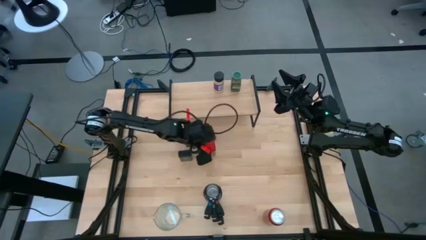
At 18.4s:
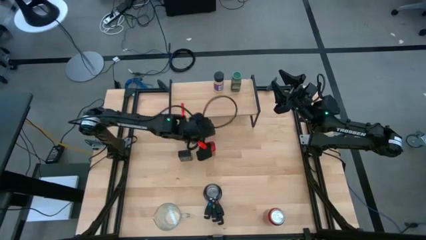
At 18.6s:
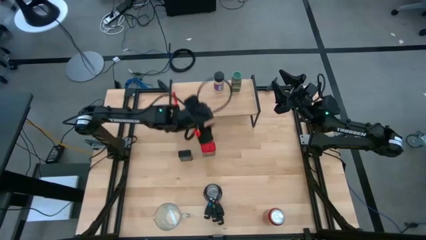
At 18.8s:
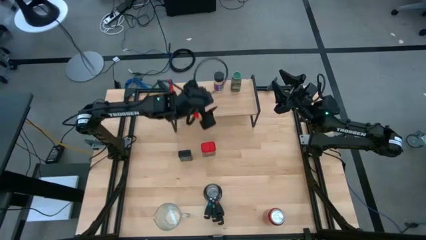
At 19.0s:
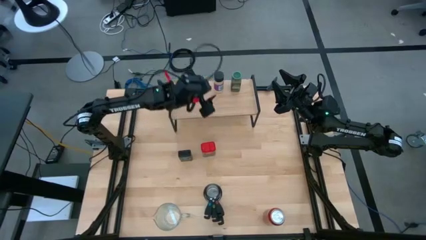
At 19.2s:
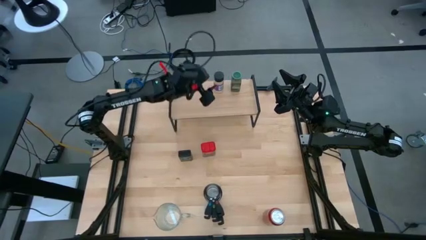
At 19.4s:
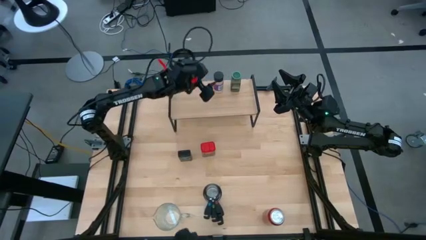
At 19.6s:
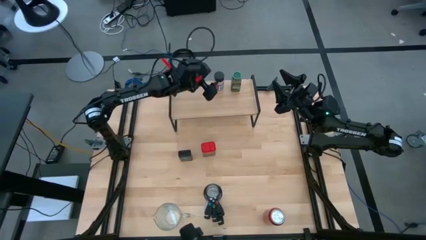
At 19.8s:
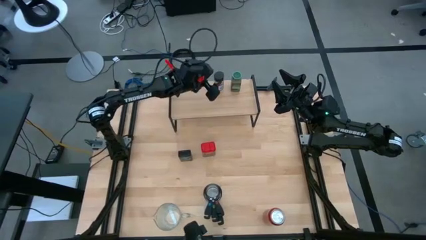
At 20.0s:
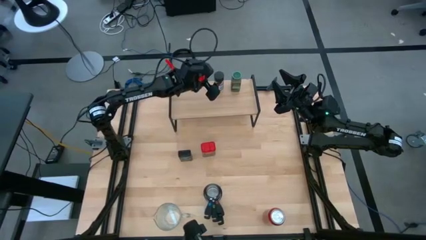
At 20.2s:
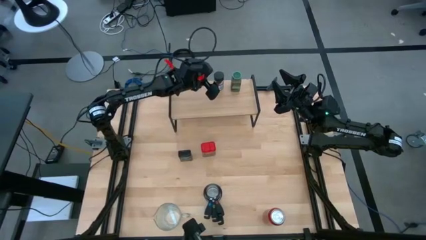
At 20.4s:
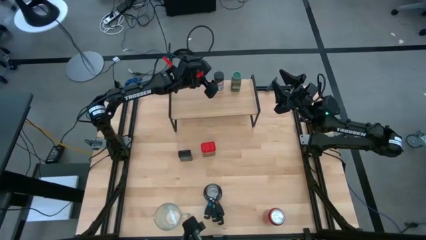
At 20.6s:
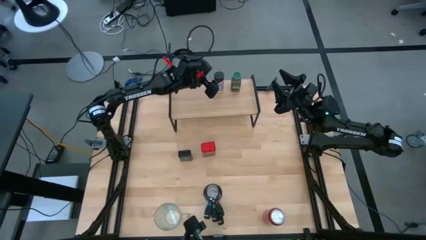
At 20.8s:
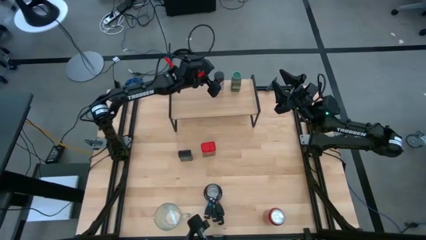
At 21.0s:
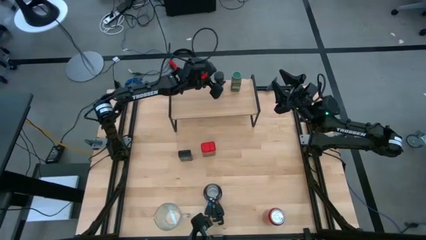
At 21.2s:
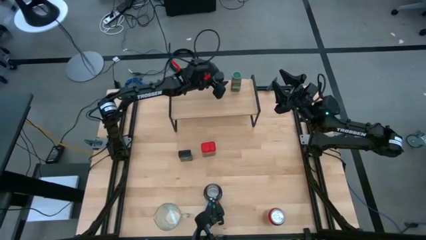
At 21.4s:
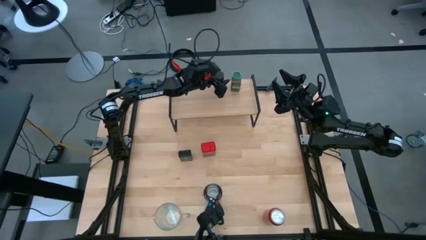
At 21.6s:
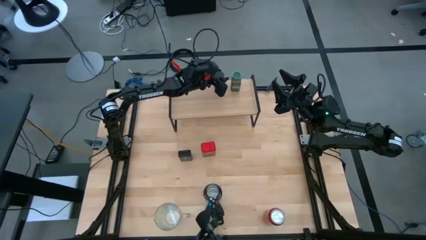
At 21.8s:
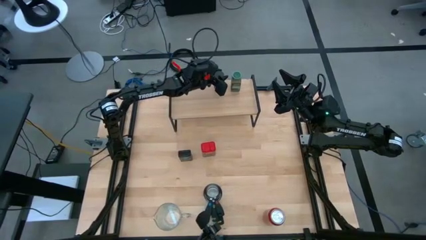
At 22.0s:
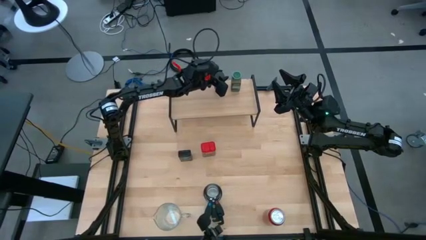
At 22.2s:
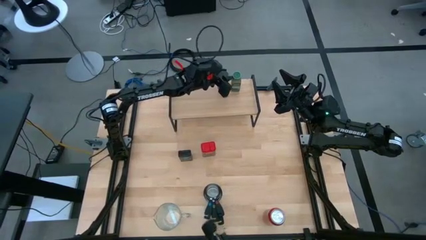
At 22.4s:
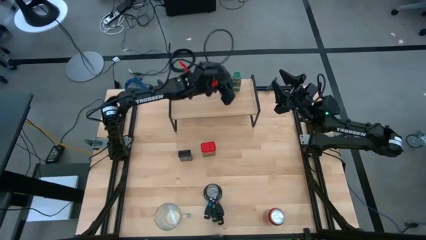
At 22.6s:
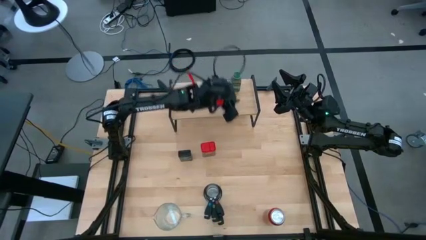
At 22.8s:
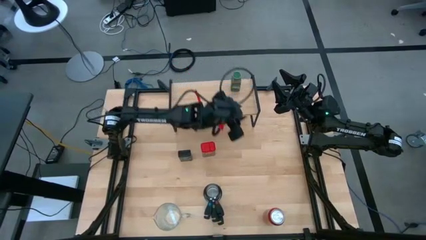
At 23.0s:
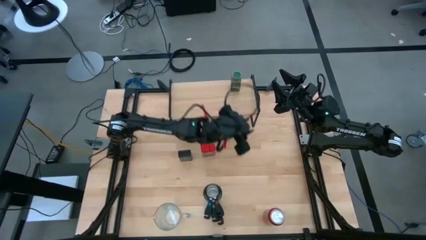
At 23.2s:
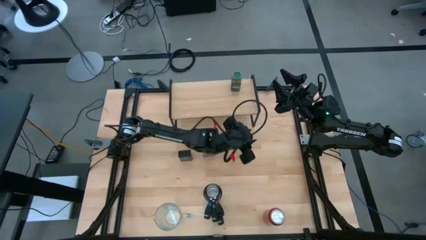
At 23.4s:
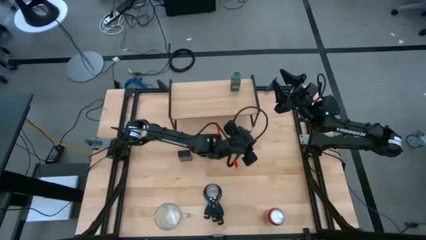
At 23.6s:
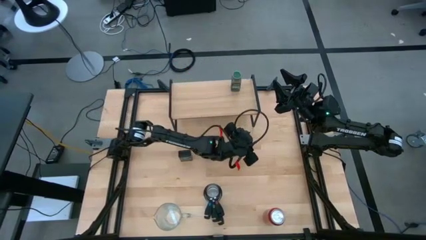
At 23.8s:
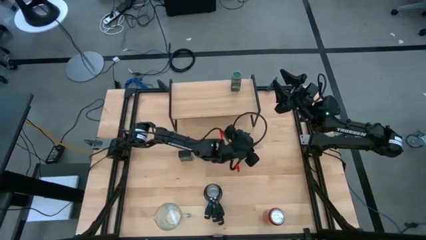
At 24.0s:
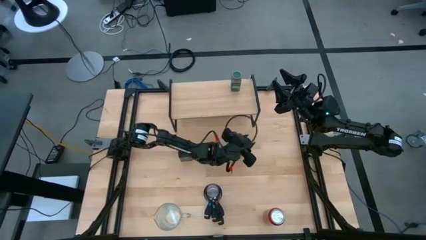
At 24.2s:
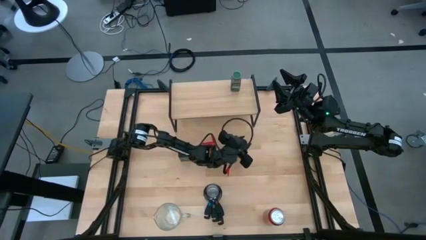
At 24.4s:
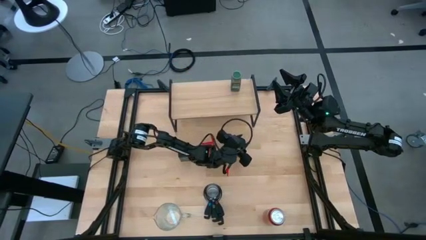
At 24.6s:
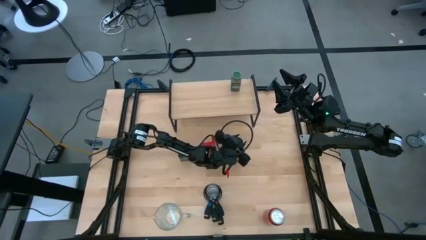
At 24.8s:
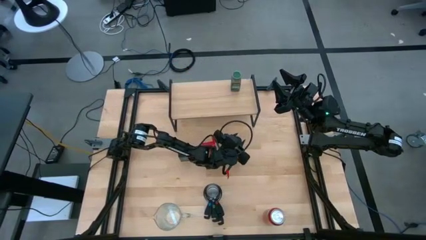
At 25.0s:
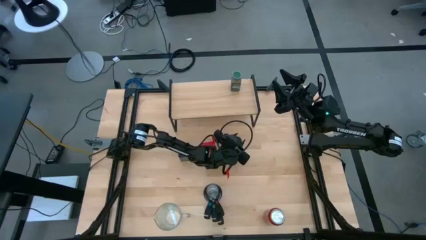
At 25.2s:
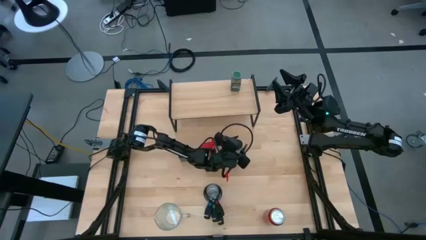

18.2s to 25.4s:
Task: Shelf spices
Remove the black seasoning bottle from the shelf

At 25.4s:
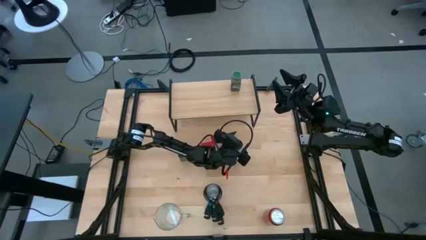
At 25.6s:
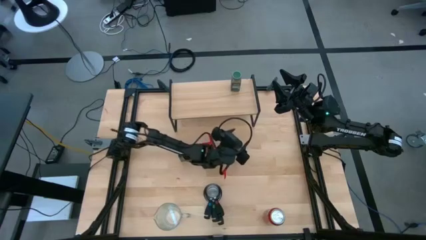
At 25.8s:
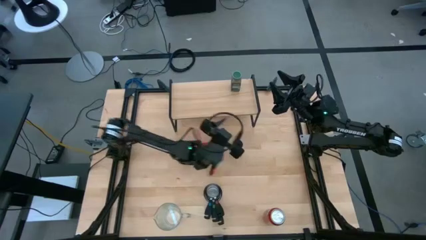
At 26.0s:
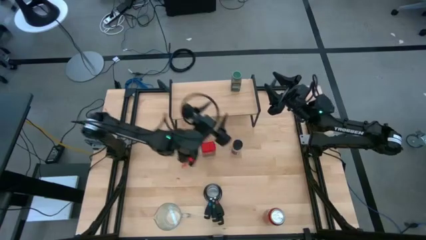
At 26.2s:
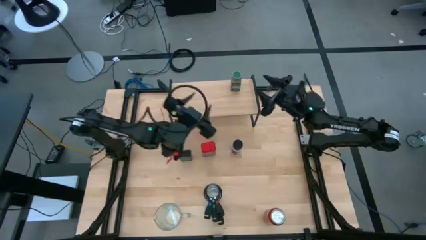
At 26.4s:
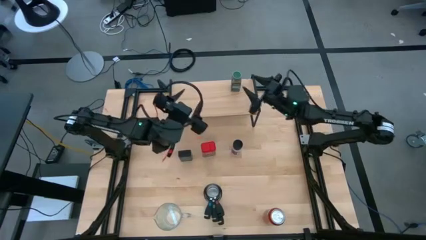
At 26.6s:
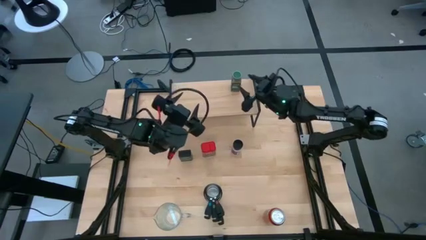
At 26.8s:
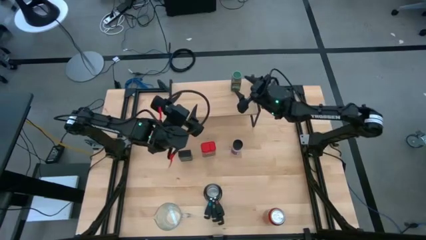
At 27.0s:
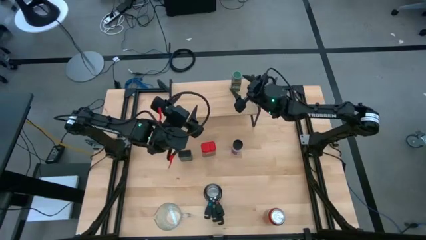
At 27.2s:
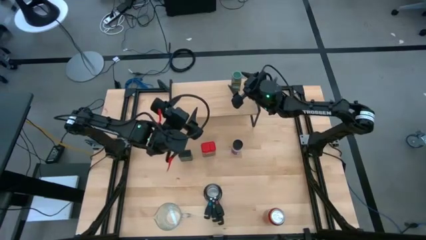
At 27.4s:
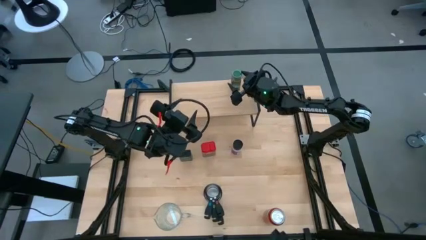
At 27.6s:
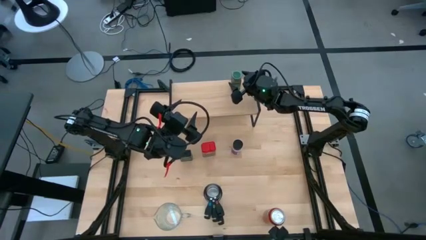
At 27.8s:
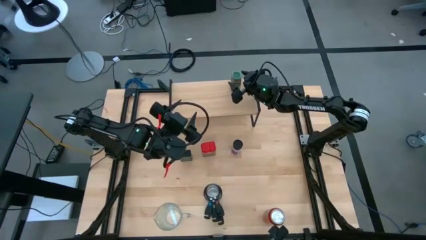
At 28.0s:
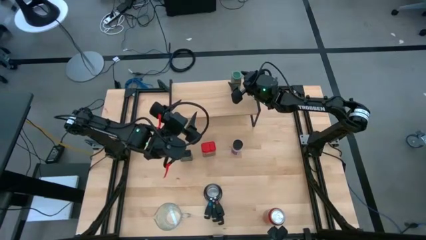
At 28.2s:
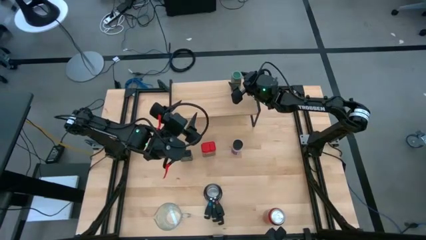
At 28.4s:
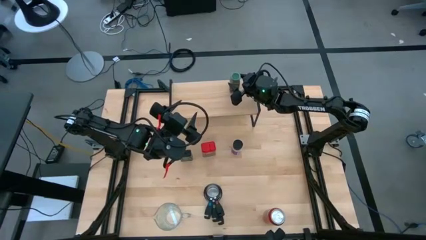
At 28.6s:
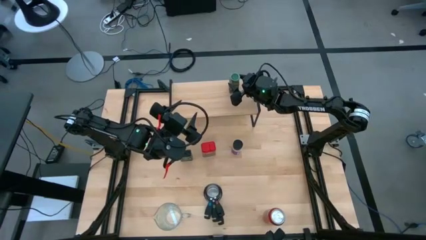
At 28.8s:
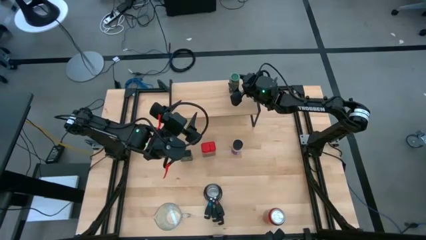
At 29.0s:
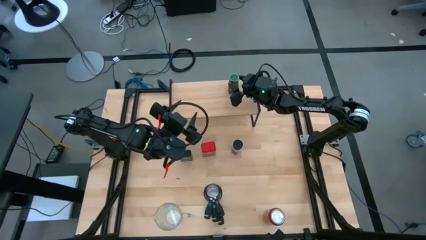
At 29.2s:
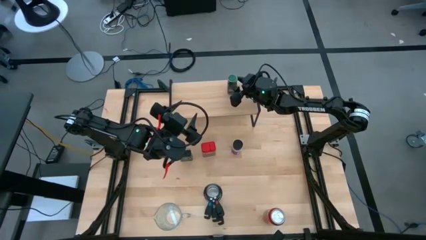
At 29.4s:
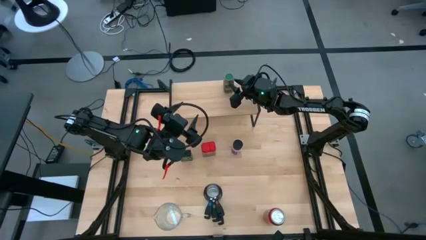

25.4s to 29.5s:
Remove the green seasoning bottle from the shelf

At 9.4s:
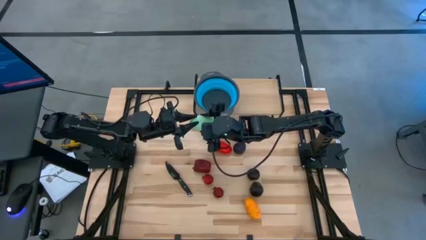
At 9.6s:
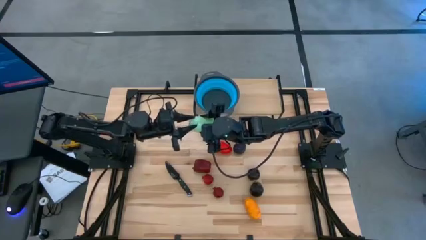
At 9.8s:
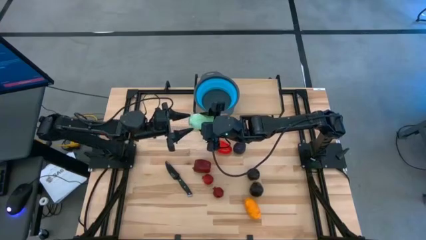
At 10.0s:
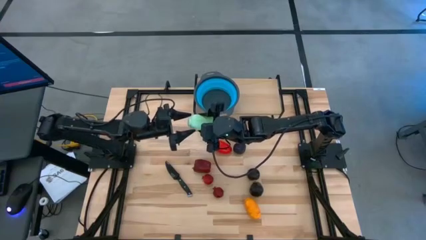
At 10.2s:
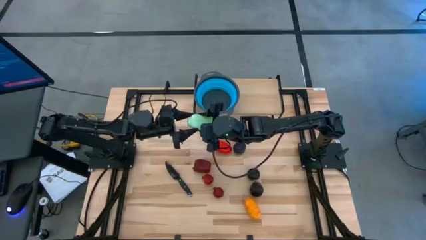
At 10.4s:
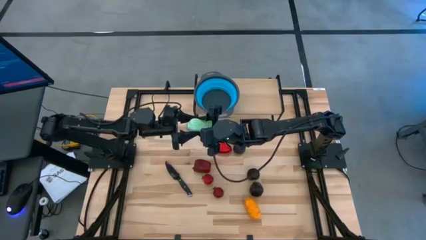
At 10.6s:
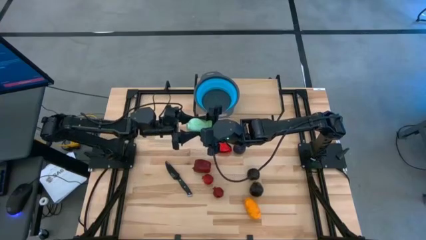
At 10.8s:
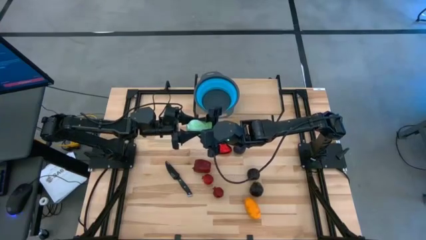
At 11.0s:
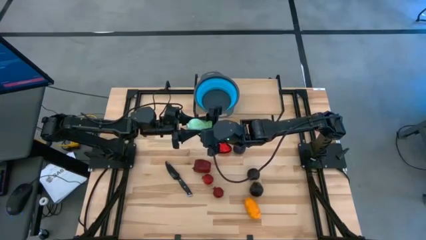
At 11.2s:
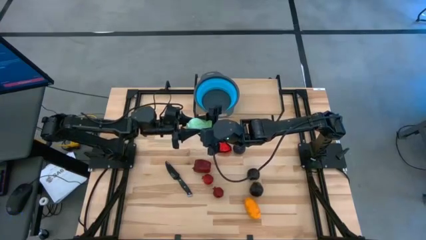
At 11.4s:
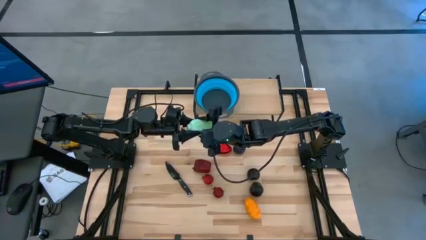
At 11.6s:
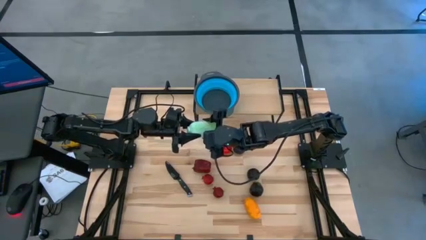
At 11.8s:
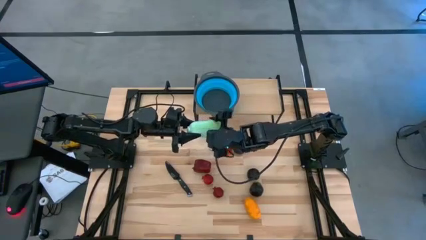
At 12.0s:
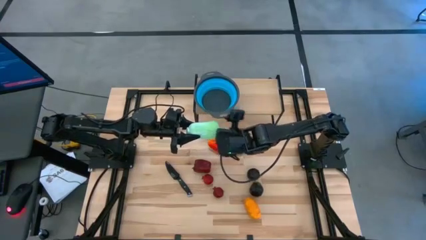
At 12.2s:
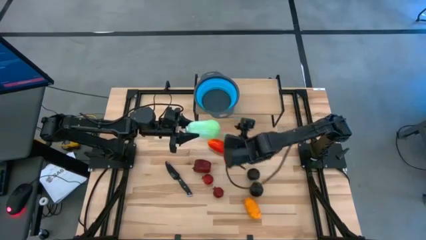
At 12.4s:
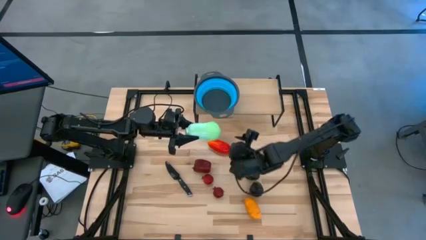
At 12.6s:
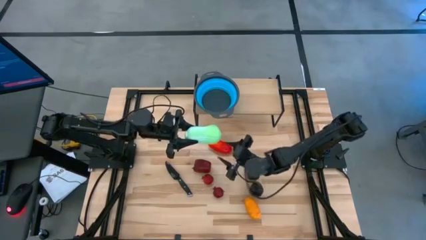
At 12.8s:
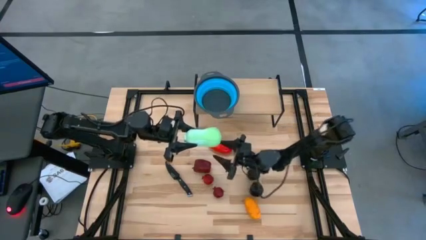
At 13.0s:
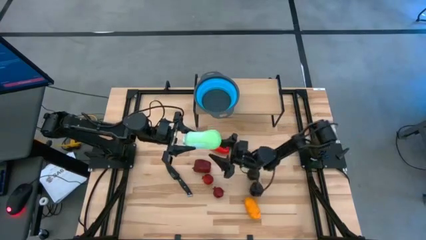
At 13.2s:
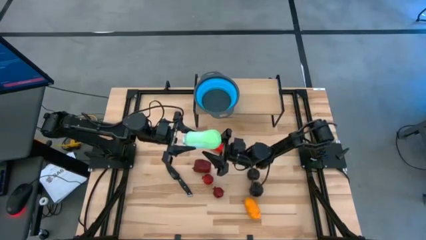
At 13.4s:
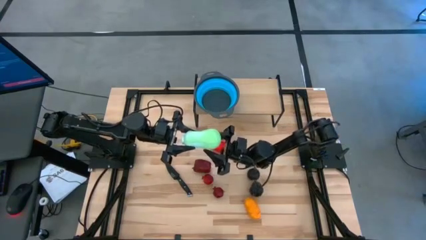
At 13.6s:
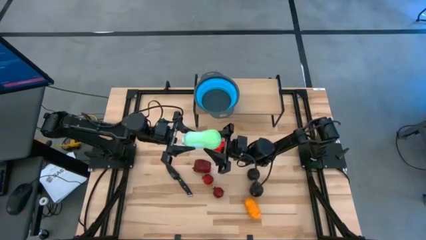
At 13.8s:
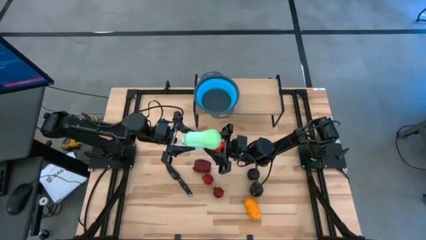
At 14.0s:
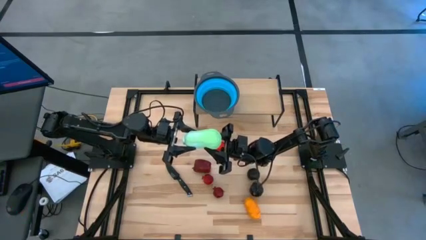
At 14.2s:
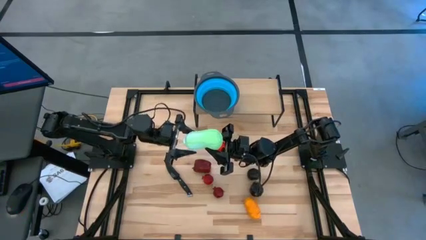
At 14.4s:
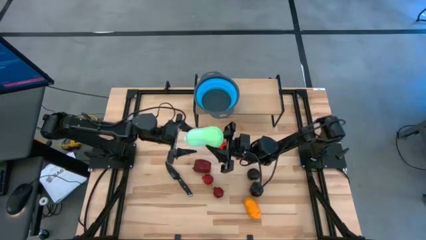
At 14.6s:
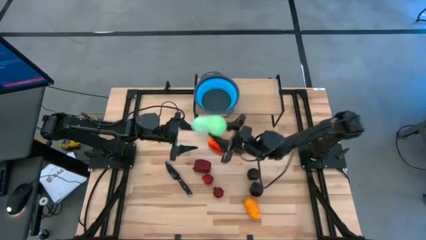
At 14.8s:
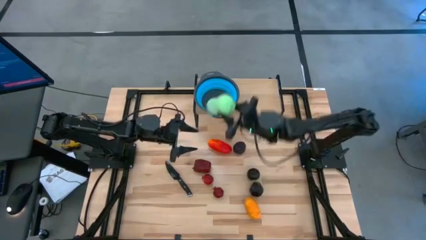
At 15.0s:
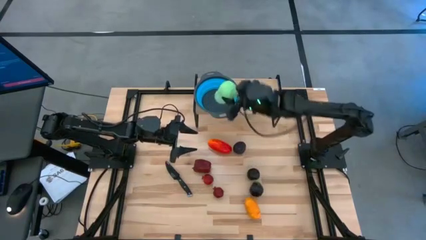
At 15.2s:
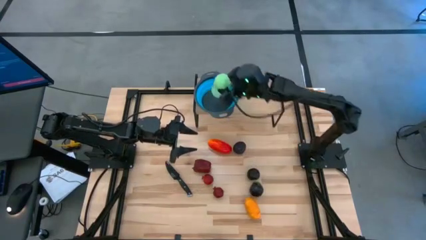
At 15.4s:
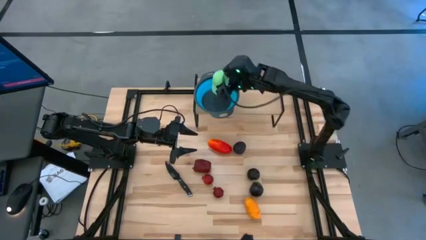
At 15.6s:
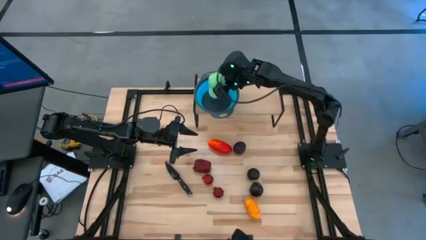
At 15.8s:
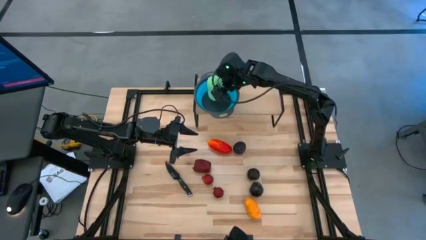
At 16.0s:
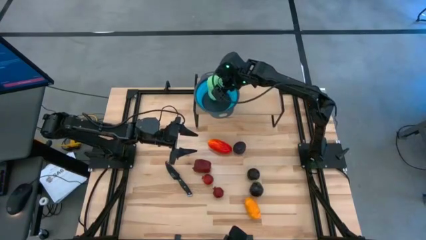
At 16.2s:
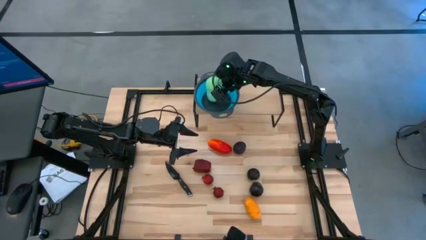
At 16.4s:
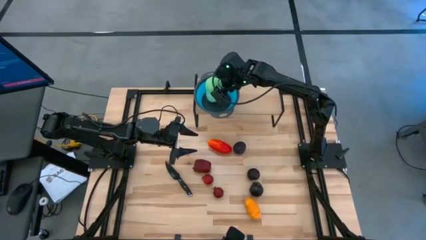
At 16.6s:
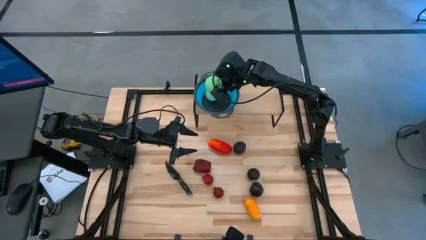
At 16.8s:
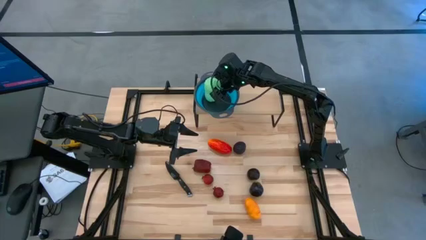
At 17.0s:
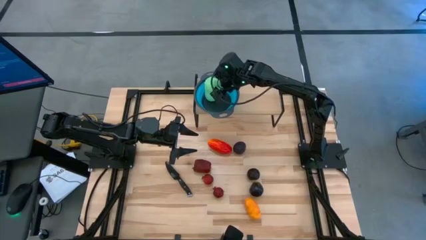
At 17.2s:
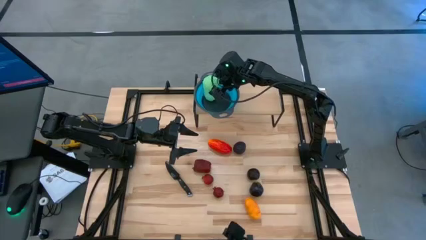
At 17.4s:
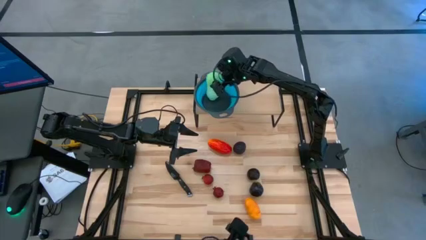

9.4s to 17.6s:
Task: Pick & Place Fruit
Put the green cabbage into the blue strainer bowl on the shelf
